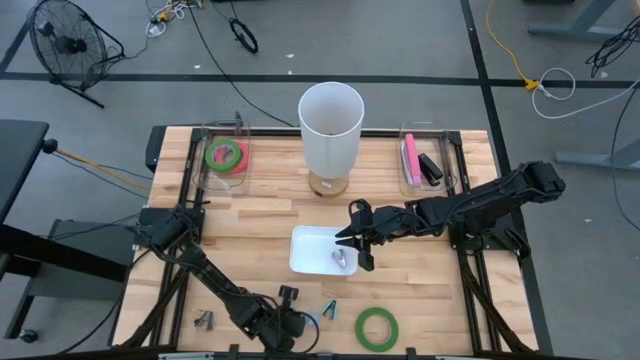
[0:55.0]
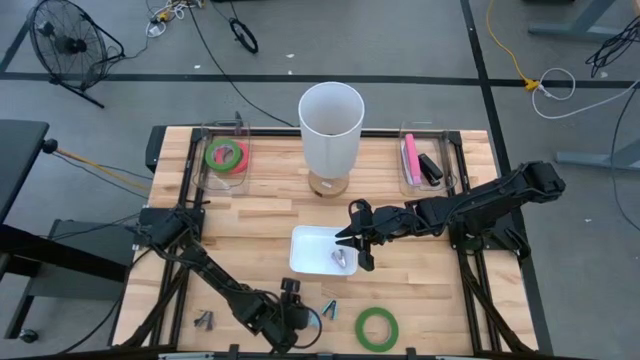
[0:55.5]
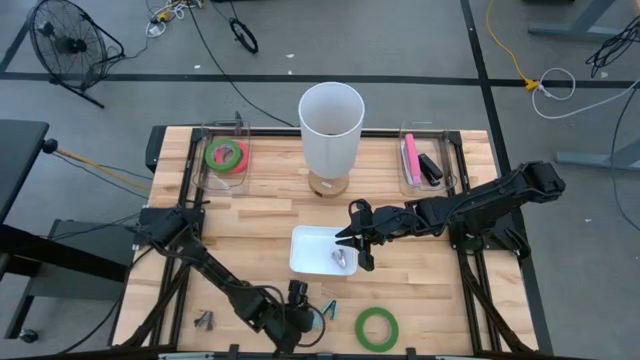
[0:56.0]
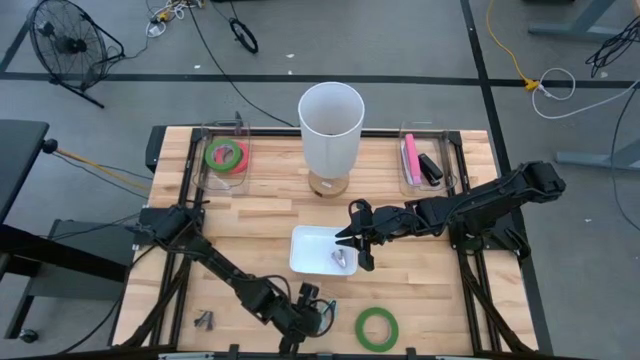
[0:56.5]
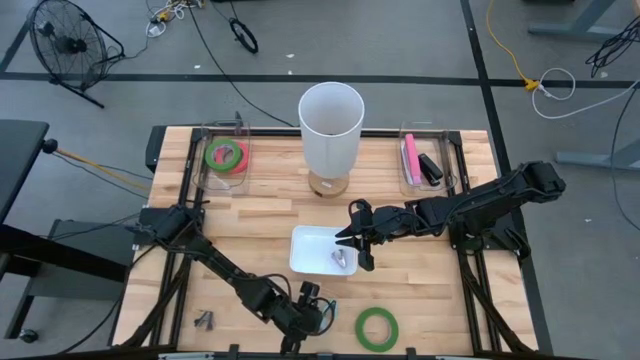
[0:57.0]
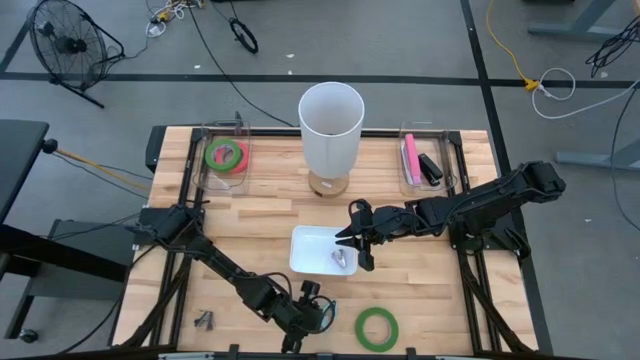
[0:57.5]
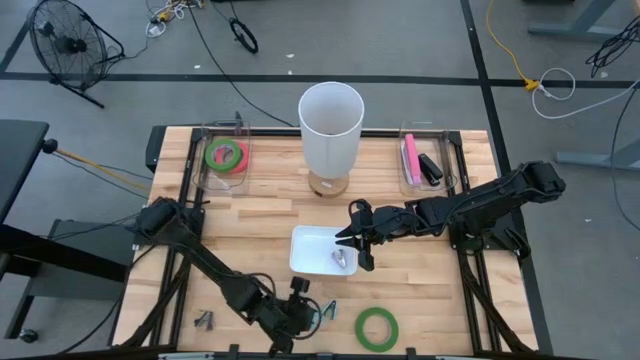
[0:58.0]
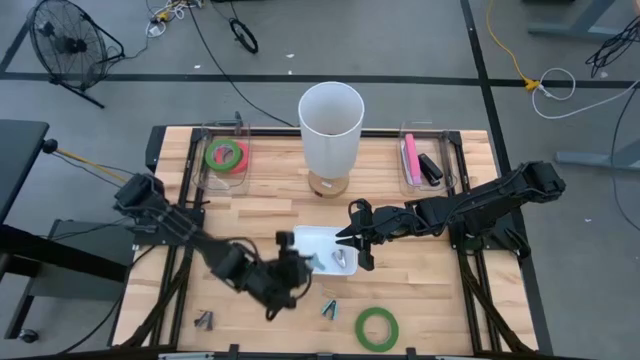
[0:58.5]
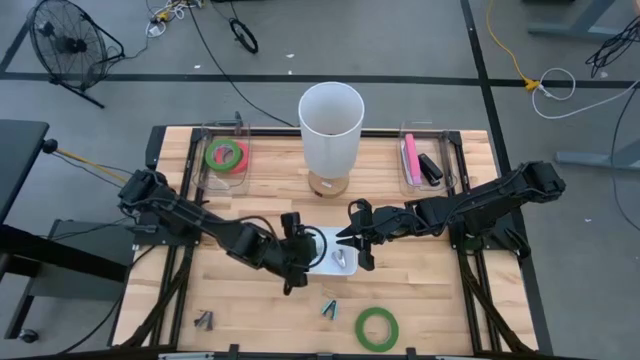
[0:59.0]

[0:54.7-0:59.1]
Task: Pick and place Stapler, Stapler remover, tape
Put the bottom blue stapler remover into the white bin

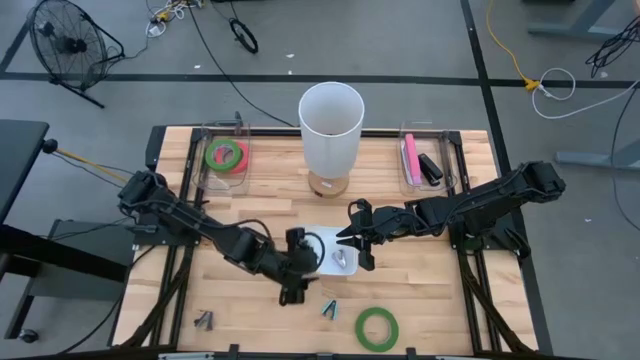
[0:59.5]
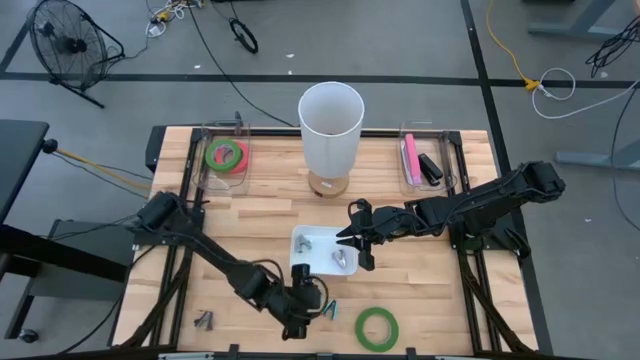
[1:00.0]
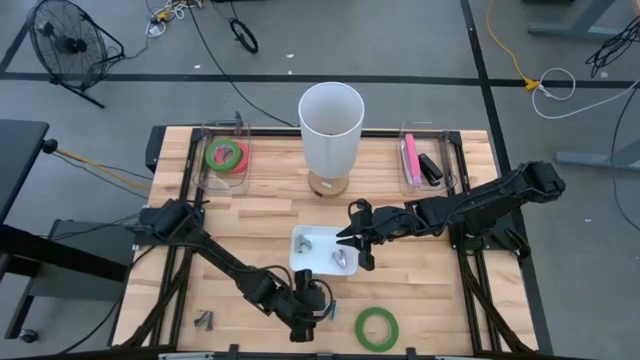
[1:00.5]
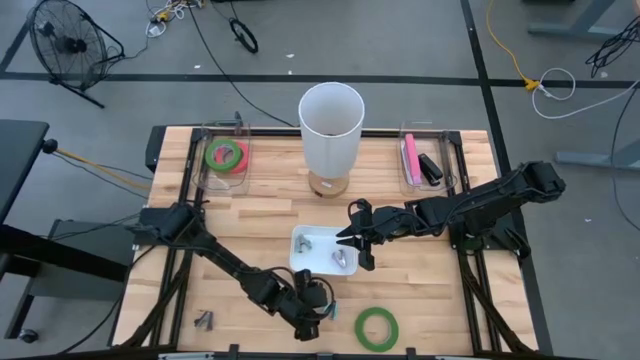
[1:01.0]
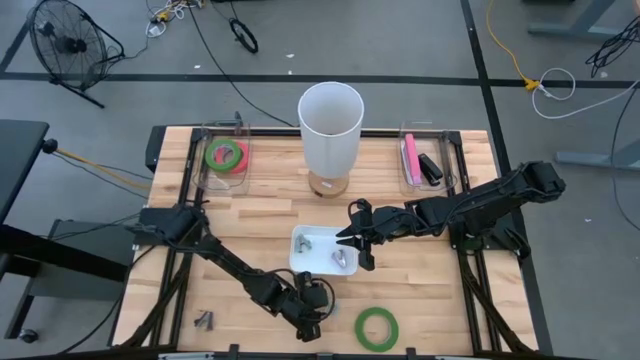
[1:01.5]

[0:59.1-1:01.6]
Put the blue stapler remover into the white bin

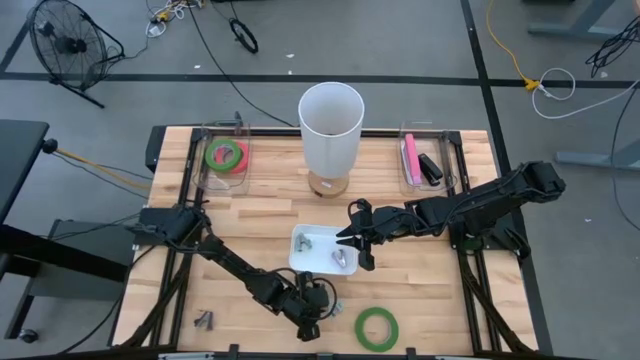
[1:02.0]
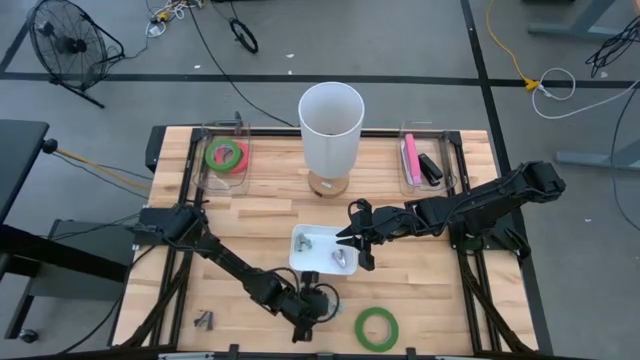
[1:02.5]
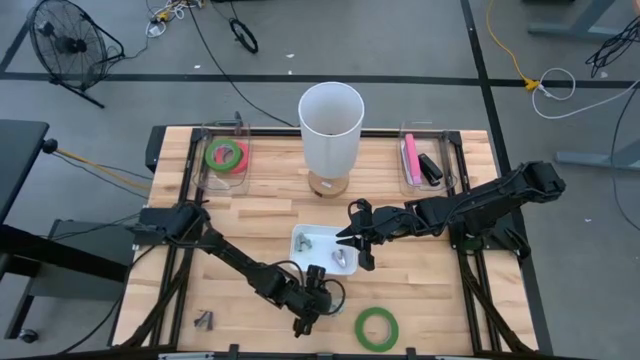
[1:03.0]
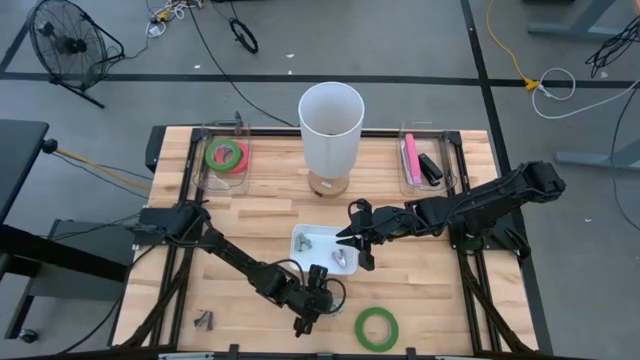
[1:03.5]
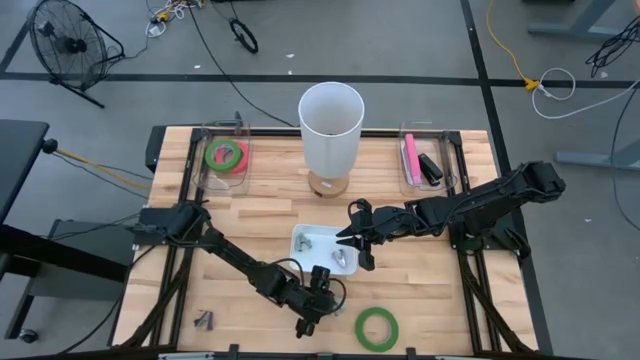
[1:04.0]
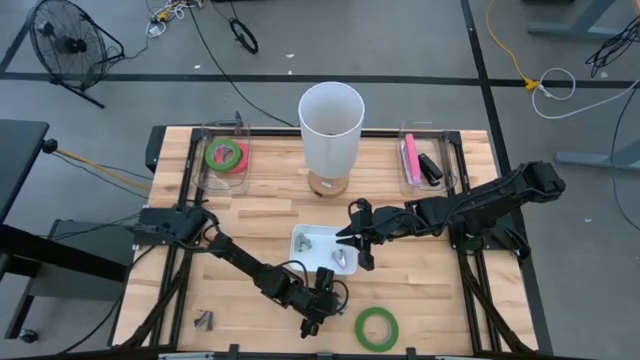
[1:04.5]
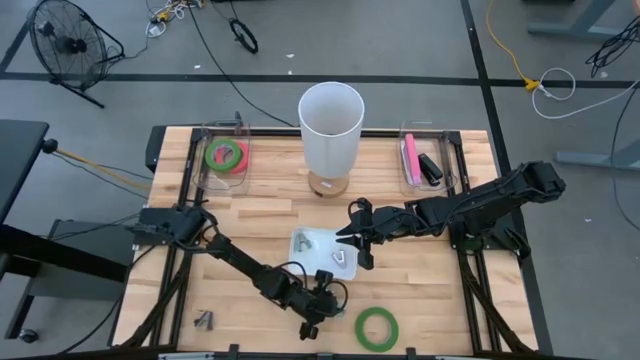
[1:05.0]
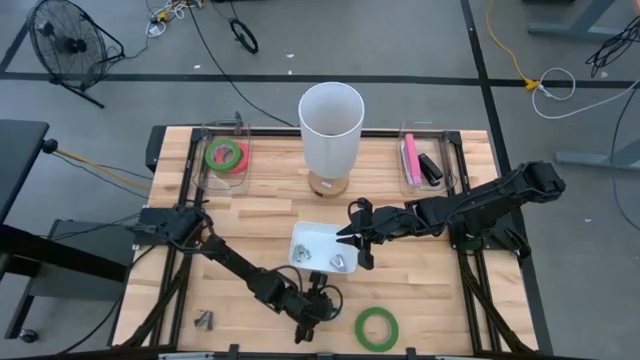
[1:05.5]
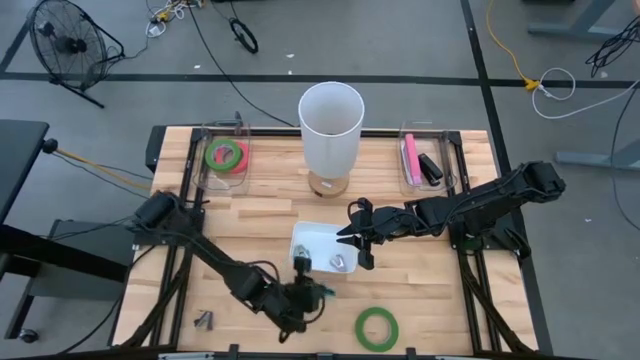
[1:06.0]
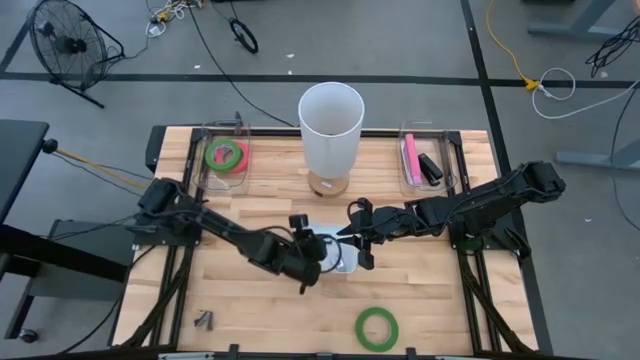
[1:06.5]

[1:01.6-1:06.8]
Put the blue stapler remover into the white bin

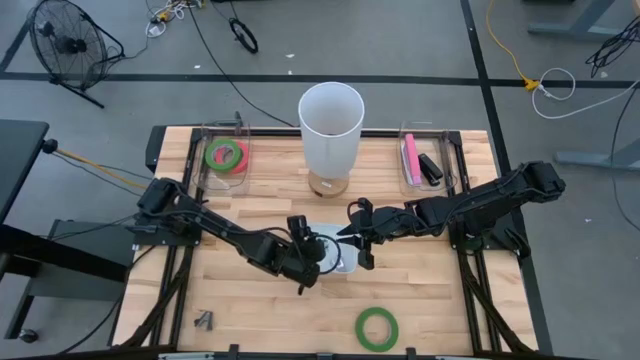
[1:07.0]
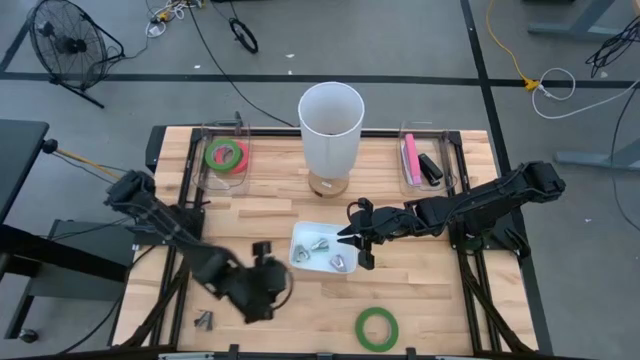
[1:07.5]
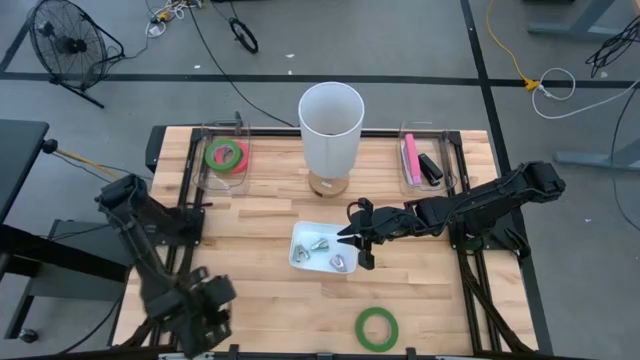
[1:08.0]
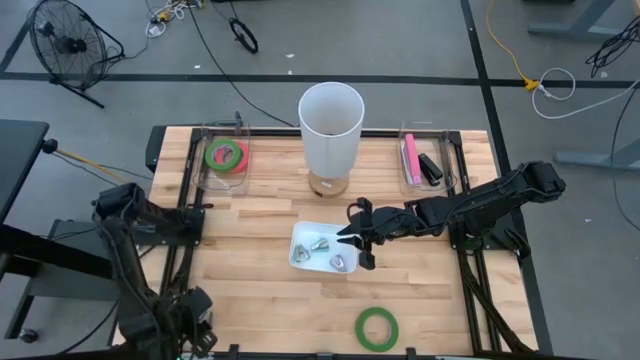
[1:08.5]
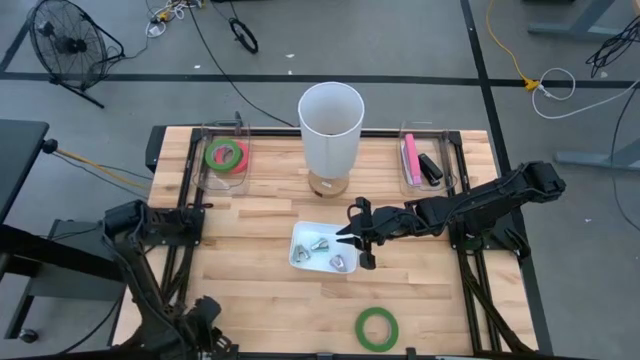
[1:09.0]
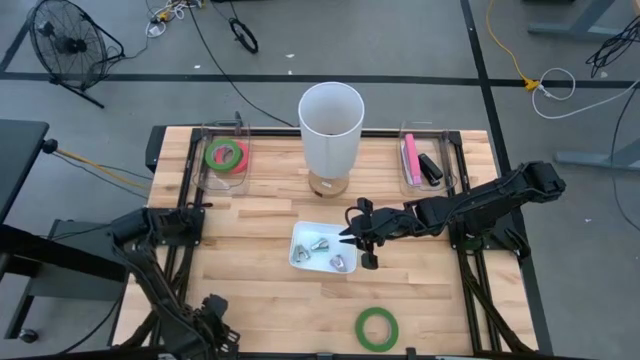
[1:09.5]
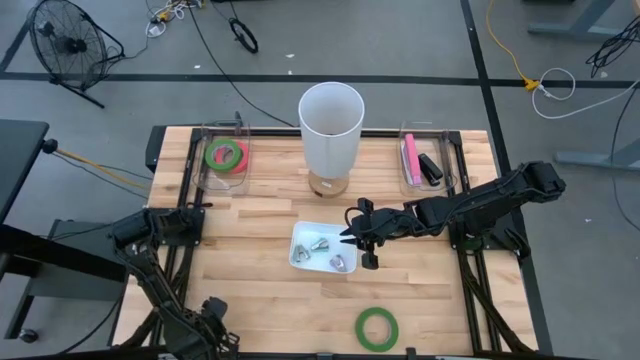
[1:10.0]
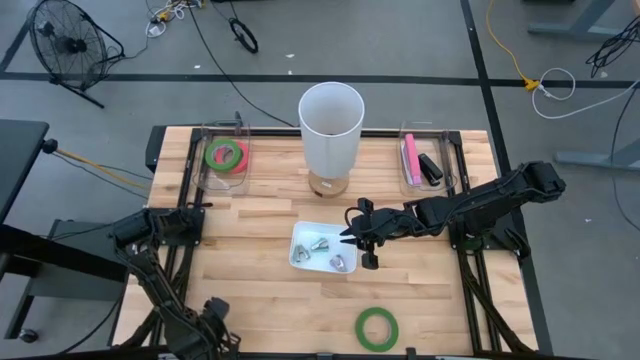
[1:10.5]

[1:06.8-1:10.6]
Put the black stapler remover into the white bin

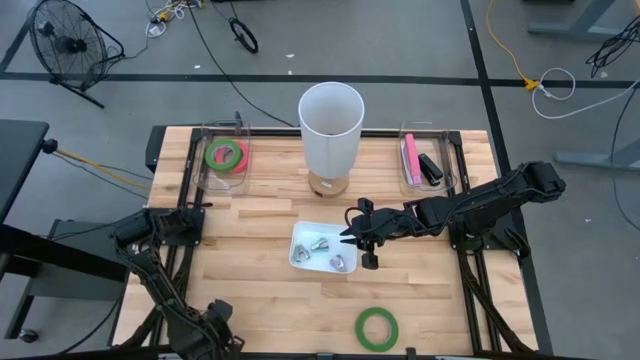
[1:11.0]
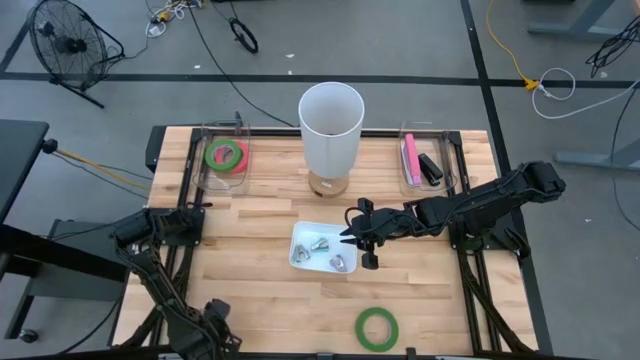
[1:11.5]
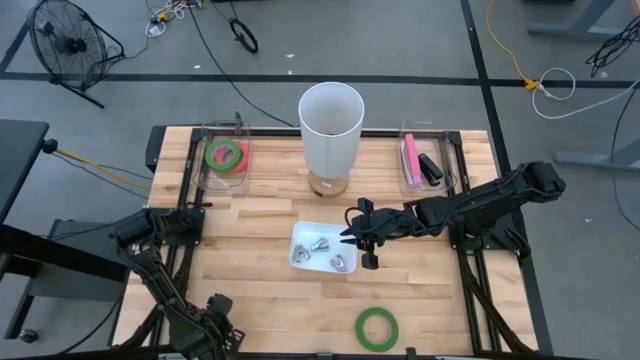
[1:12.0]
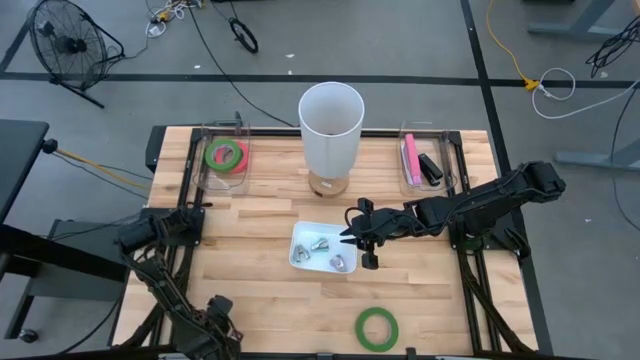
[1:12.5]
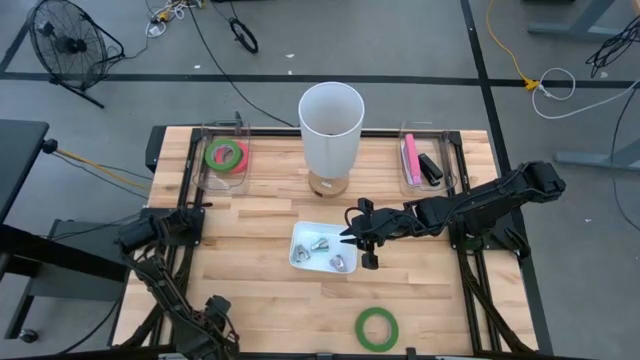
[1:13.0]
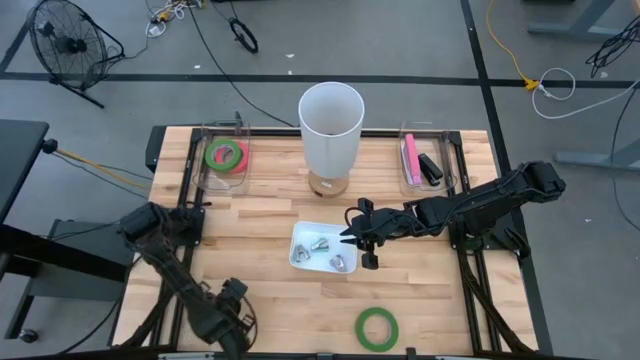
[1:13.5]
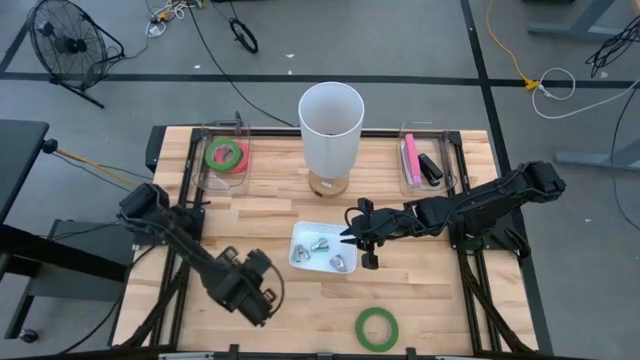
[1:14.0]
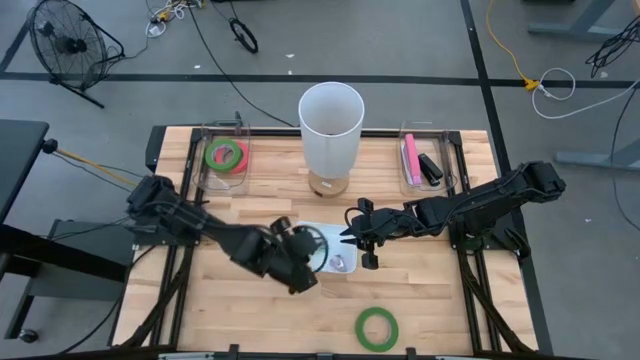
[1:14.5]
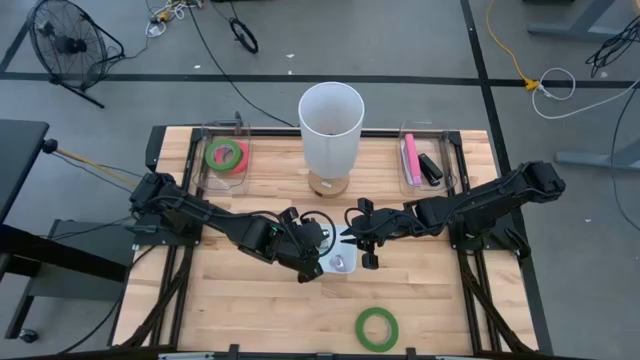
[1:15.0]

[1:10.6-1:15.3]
Put the black stapler remover into the white bin
